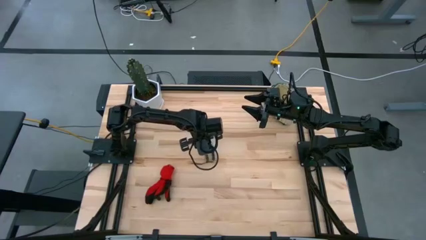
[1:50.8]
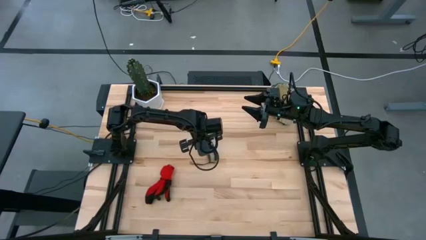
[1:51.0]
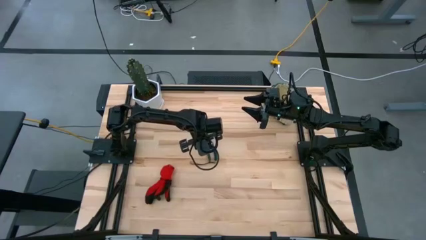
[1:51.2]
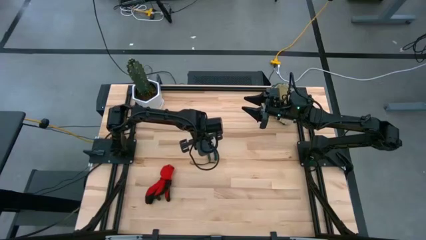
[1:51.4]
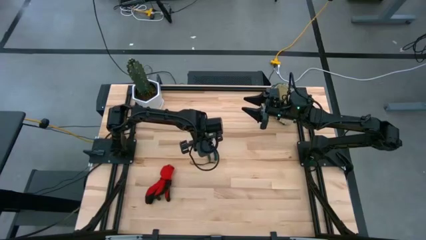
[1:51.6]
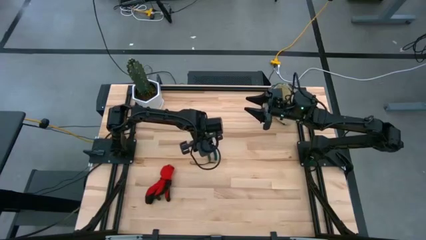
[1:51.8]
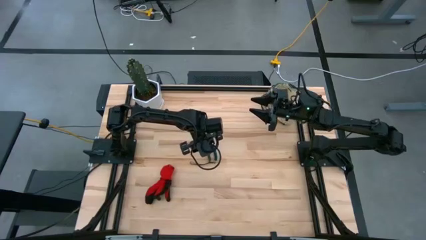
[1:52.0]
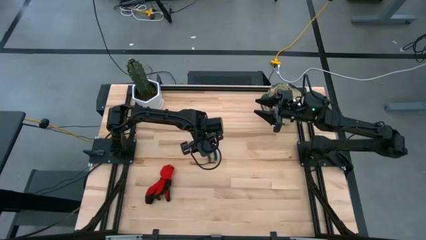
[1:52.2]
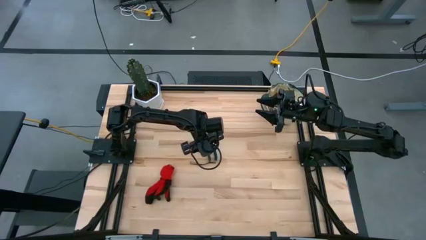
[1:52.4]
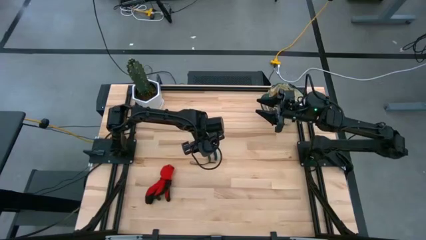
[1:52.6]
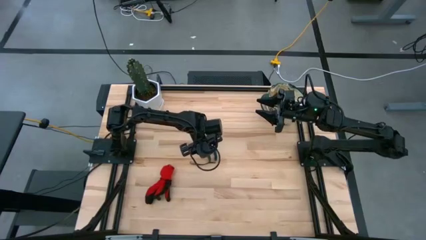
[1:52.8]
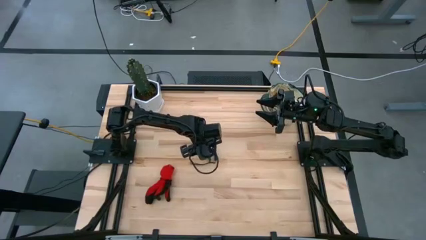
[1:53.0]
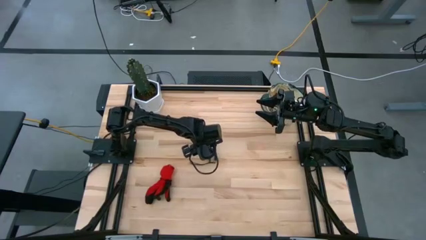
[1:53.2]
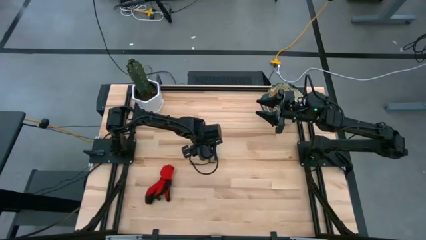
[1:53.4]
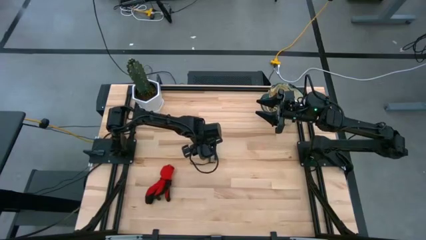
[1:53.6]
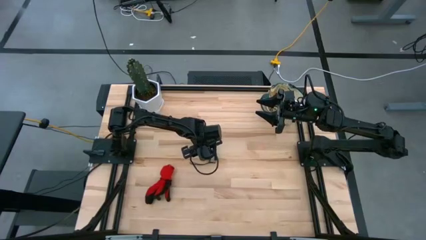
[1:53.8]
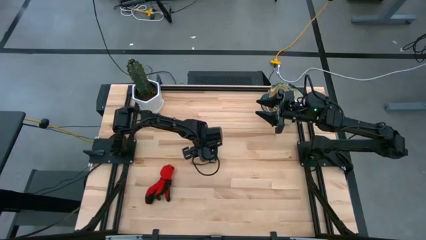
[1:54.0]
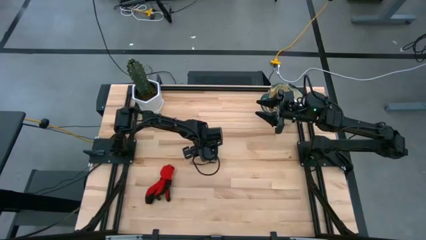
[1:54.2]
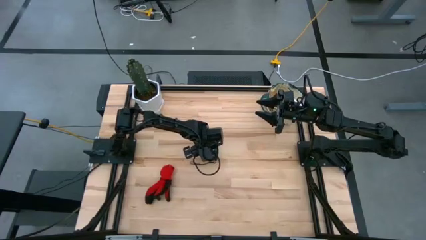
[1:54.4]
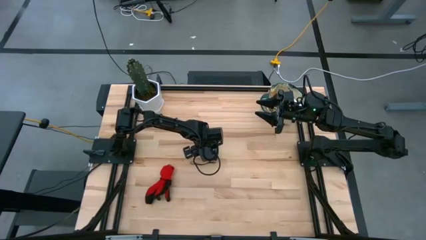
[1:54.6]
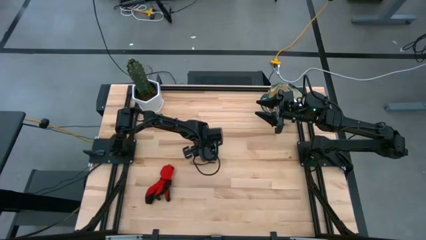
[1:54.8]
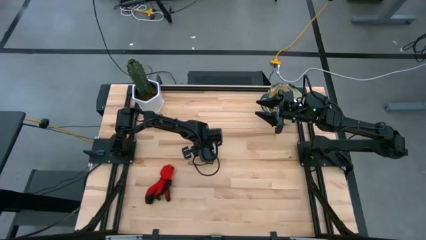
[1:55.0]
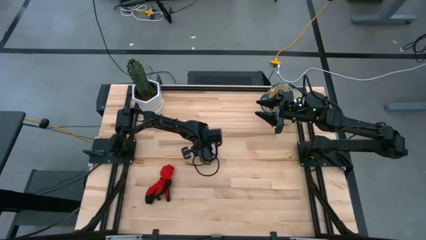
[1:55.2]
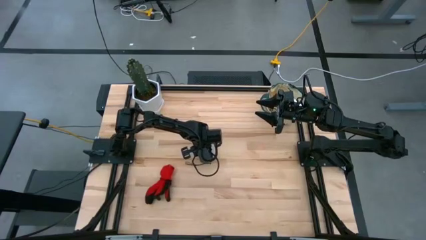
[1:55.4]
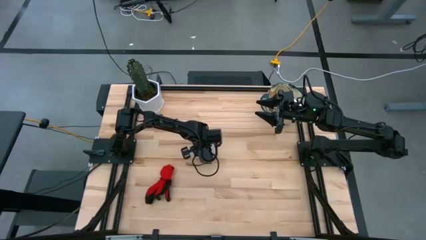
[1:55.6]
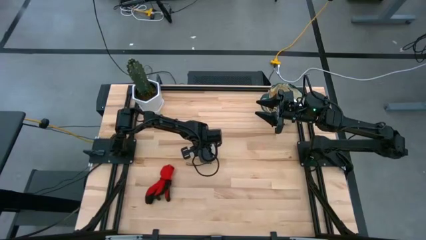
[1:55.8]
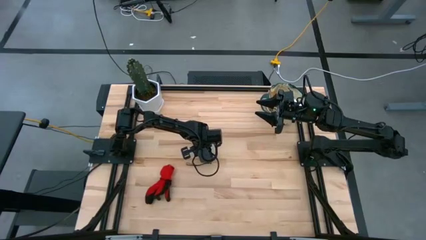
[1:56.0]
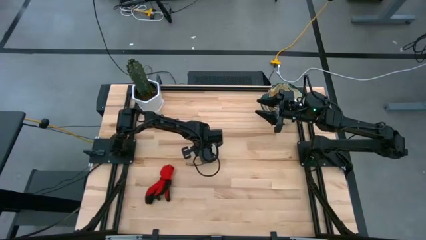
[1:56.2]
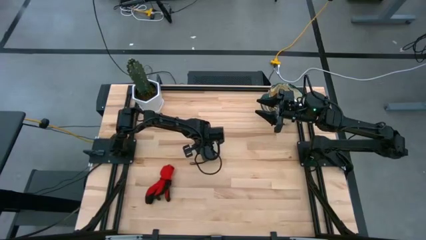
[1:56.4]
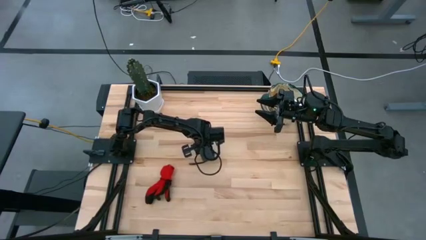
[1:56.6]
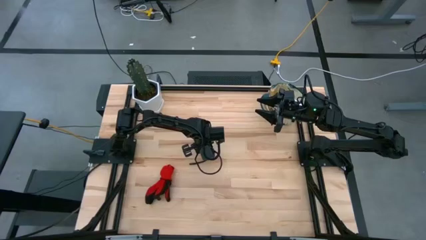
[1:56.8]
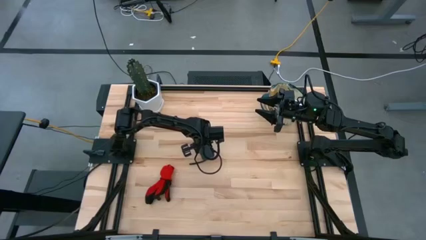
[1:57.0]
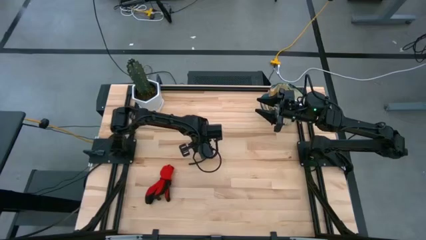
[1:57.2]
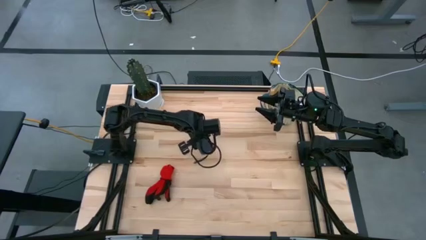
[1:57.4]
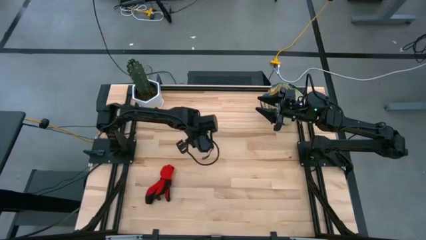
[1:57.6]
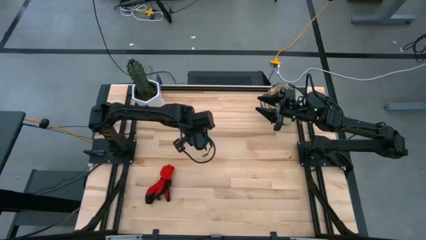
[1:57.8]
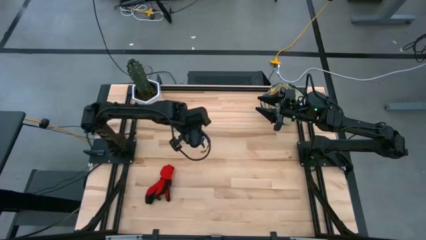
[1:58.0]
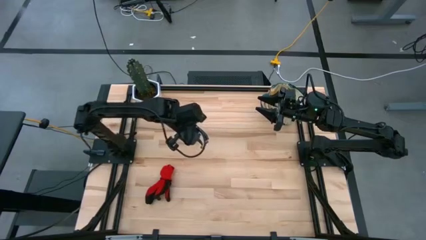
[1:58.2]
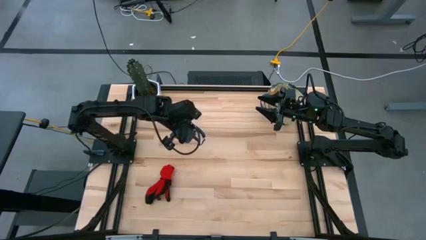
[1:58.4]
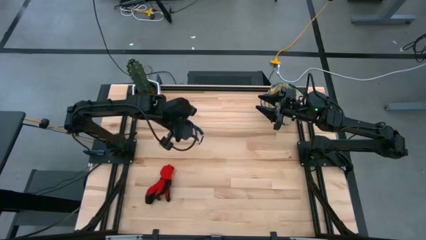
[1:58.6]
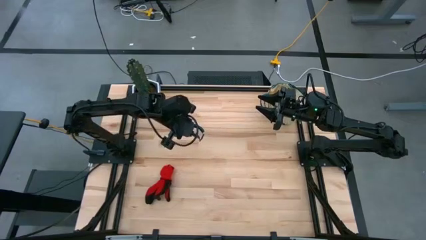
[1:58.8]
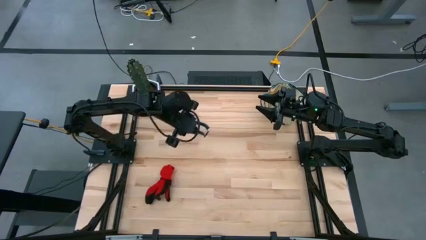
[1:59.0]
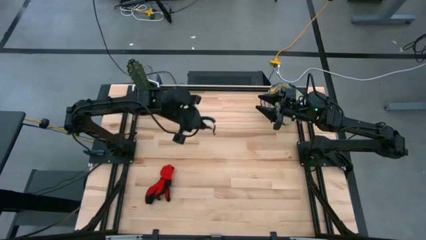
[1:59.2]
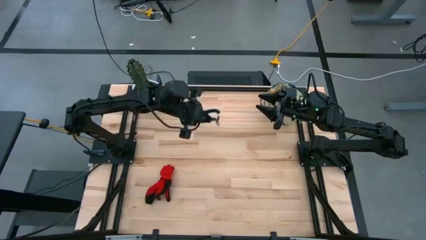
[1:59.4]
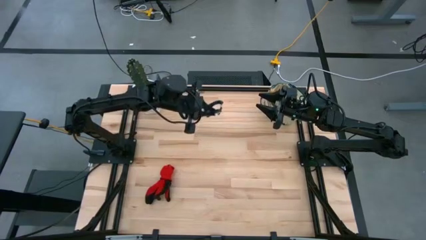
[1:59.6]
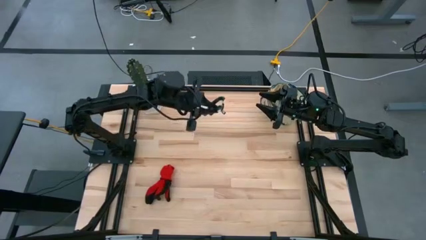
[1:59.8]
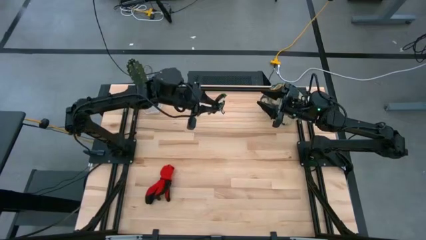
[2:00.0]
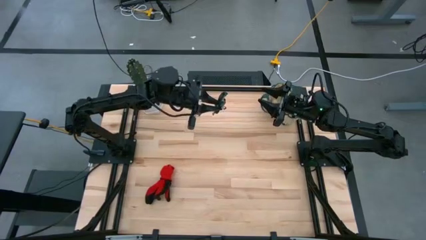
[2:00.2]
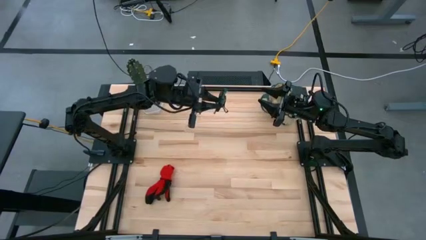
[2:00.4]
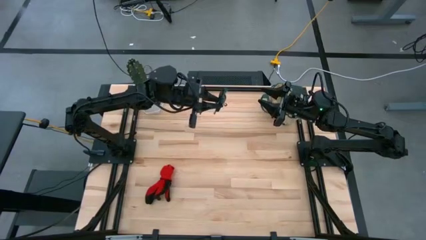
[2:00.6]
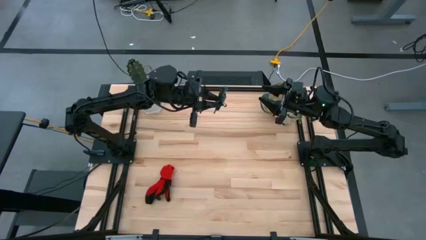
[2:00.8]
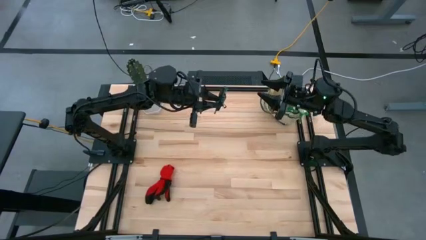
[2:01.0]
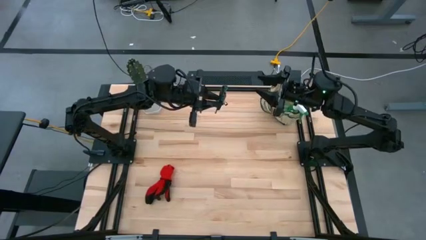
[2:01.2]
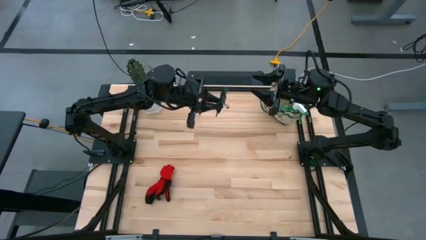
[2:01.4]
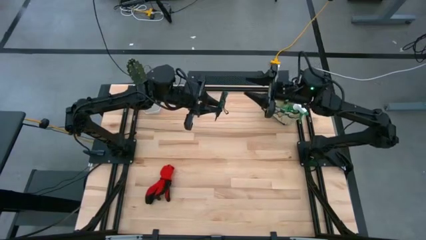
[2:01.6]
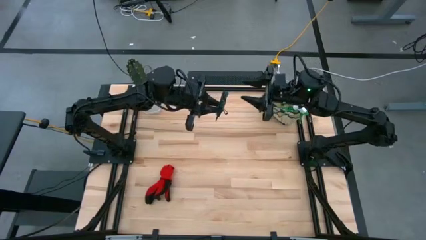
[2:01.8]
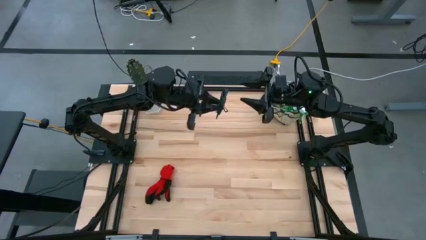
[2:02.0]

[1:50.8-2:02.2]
Task: Pick & Place Garden tools in Gardening bag
Put the green shear scissors into the white gardening bag

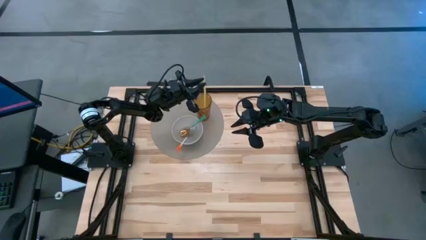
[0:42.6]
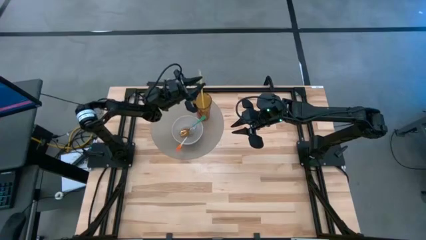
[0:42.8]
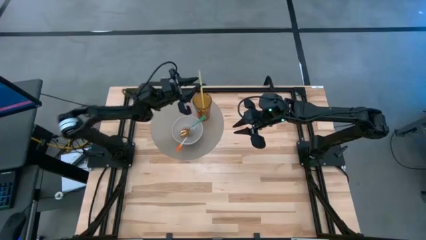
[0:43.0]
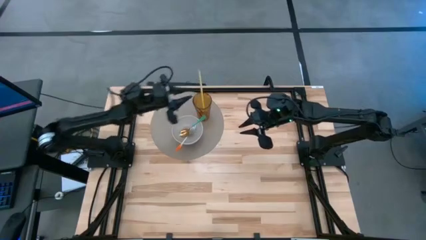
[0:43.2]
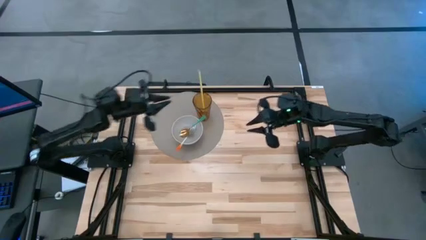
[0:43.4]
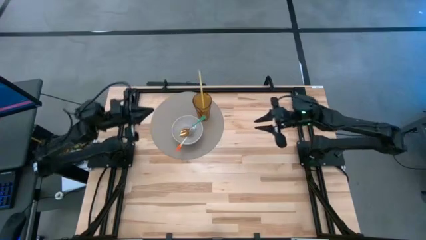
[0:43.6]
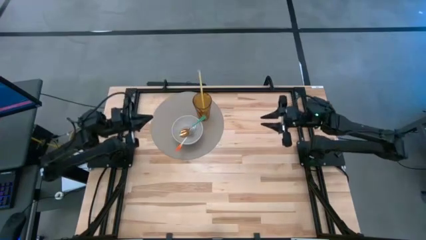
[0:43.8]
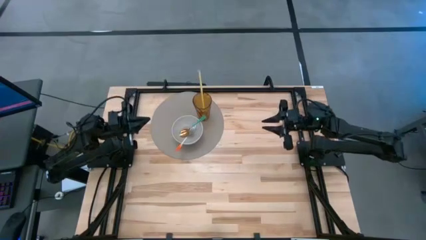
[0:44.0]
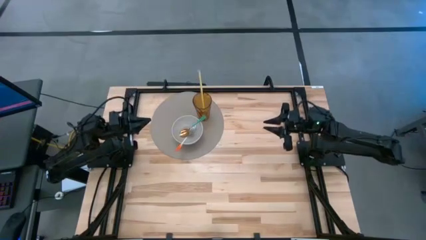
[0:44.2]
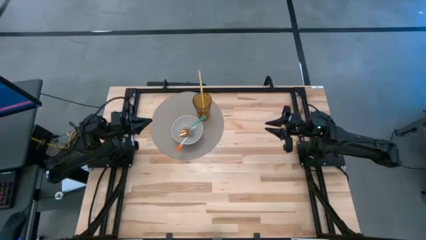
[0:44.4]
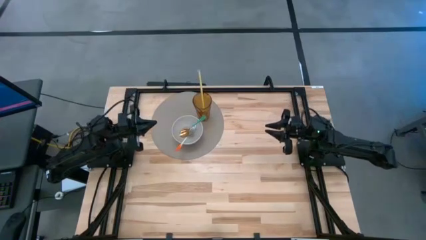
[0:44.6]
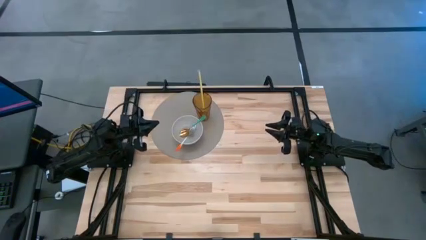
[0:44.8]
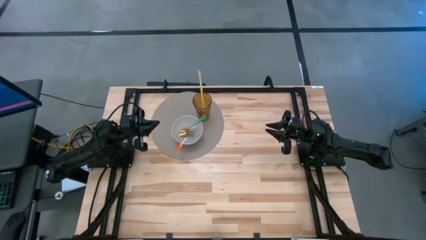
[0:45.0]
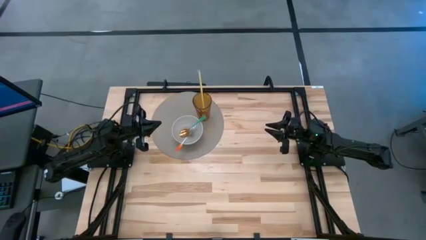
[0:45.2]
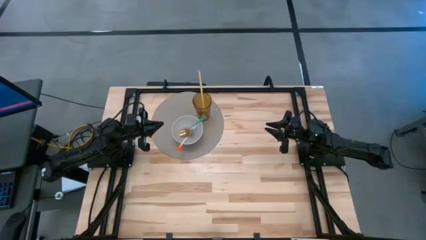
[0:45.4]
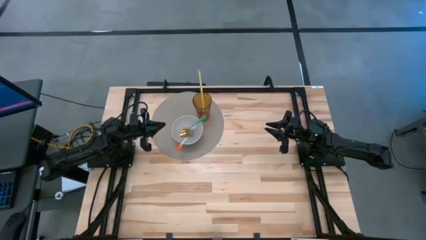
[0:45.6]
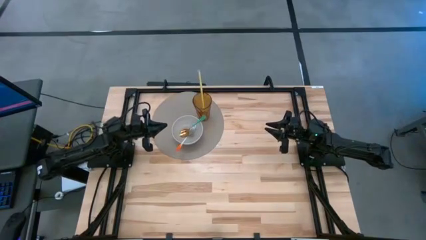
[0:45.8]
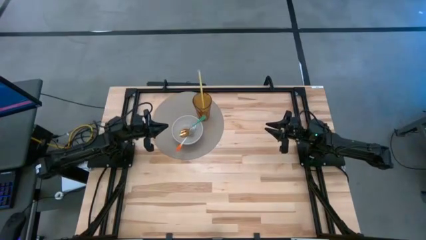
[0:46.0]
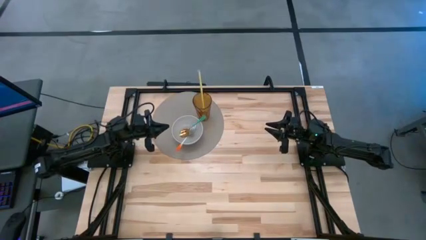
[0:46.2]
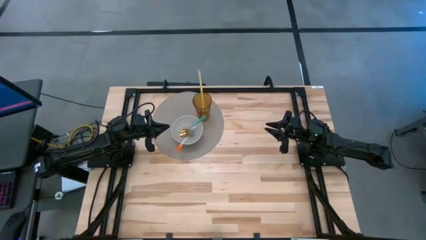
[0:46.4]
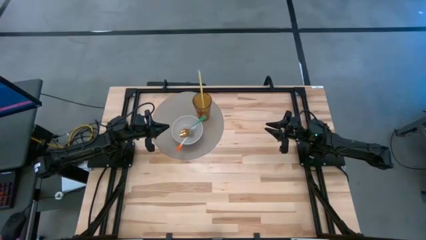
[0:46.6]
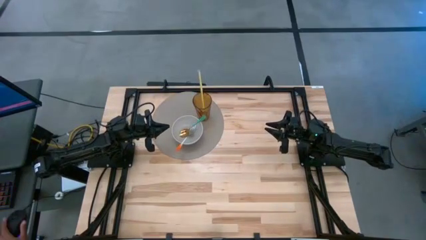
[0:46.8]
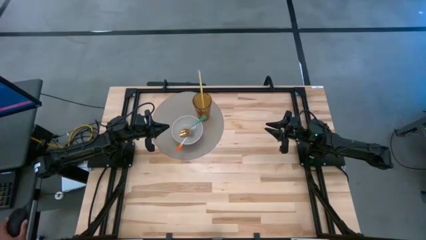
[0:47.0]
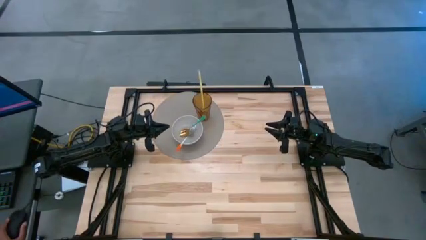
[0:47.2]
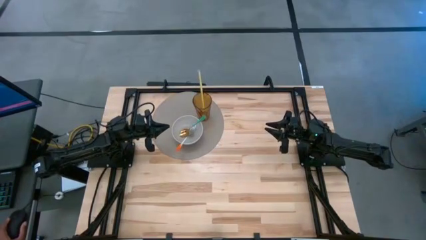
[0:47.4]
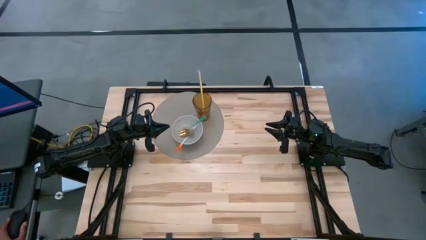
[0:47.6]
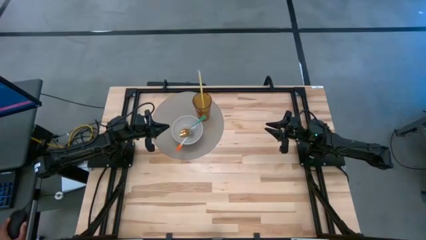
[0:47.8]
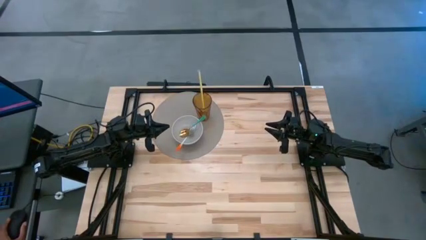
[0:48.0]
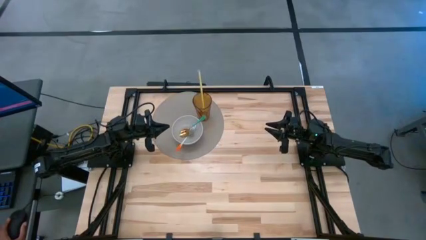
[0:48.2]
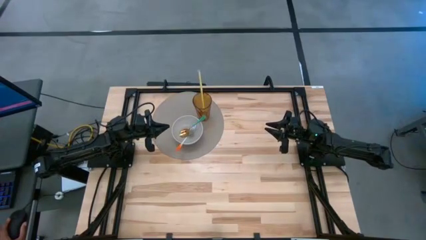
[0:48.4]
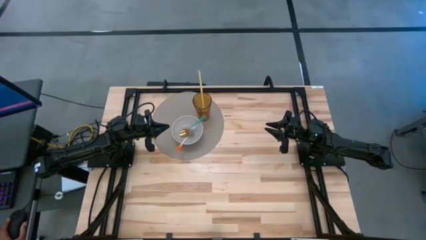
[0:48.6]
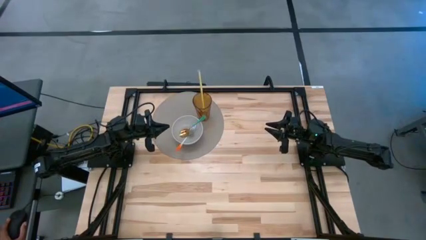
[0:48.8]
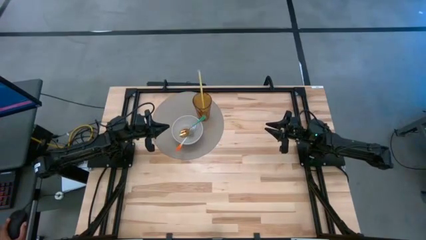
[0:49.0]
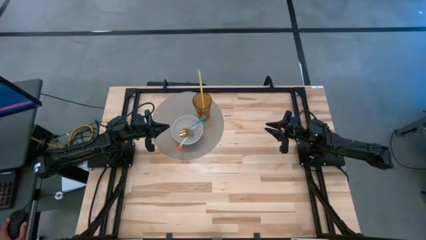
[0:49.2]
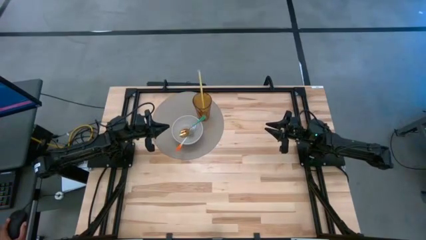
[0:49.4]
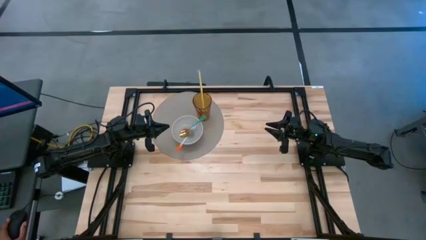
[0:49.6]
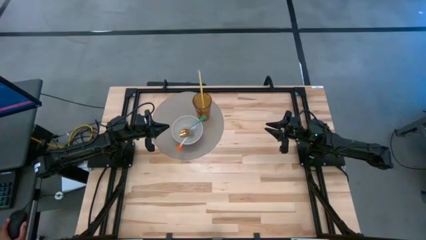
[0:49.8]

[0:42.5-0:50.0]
Task: Pick & Place Utensil
Return to Home Position
